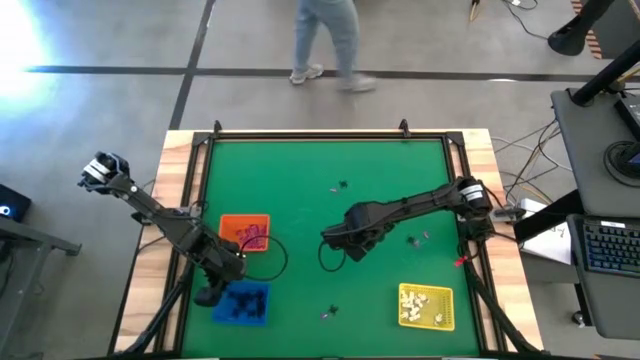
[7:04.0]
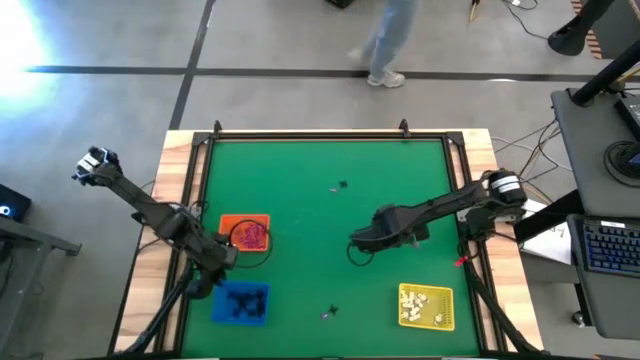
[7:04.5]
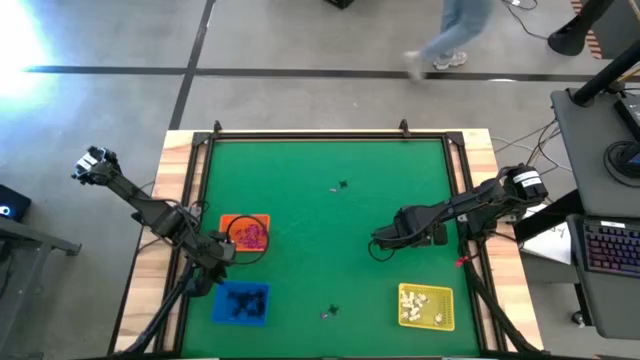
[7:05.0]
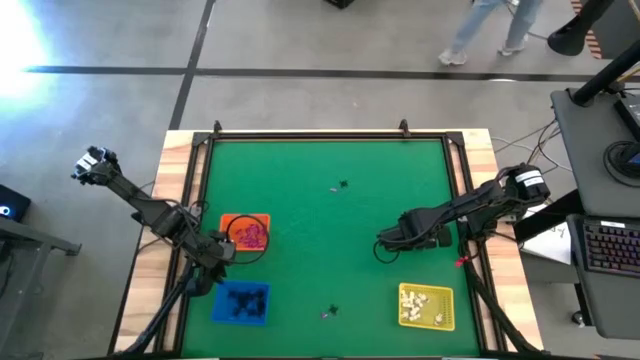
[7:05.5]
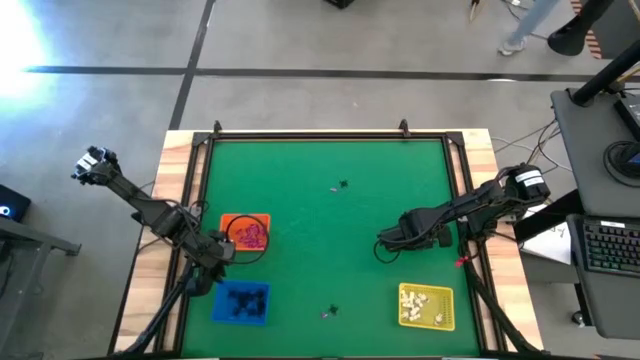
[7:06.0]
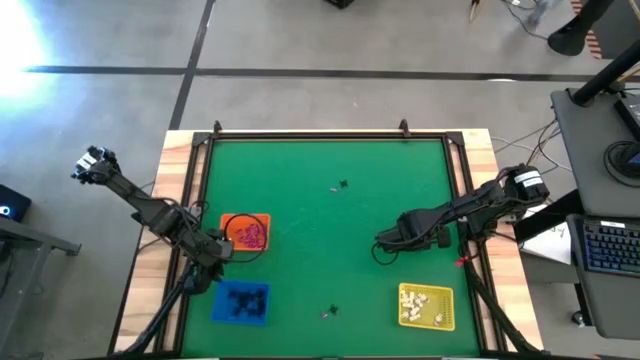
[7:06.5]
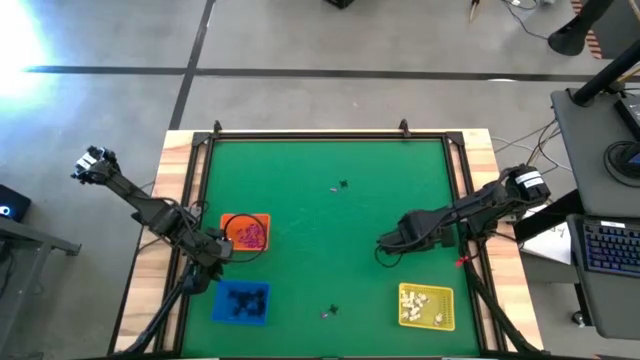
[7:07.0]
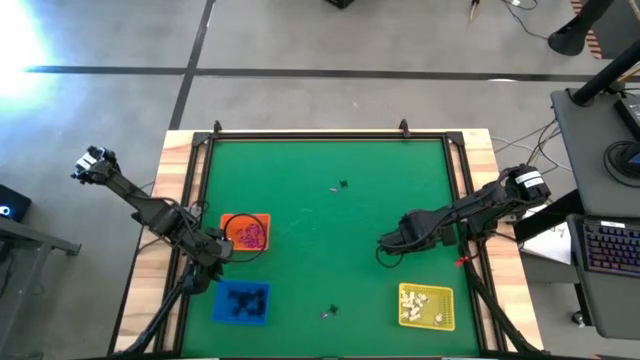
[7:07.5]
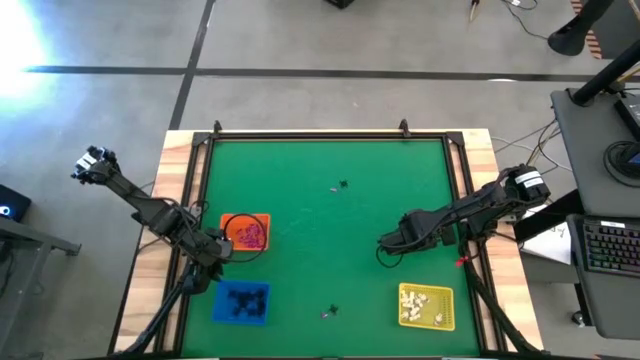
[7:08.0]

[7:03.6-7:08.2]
Task: Sort Halloween decoration
Put the violet witch hat toy into the orange bin

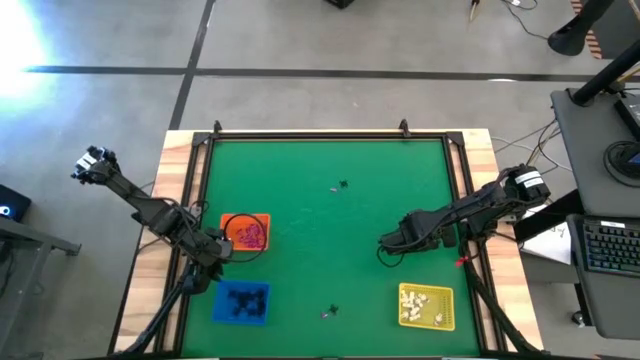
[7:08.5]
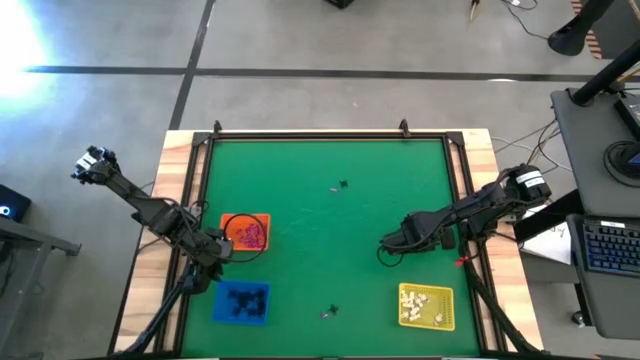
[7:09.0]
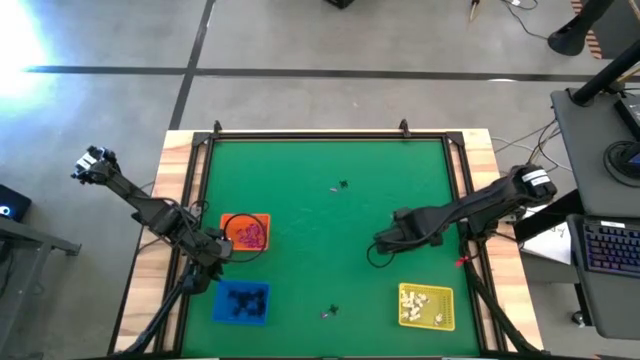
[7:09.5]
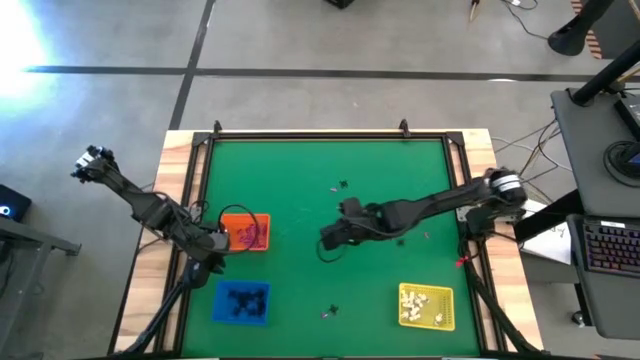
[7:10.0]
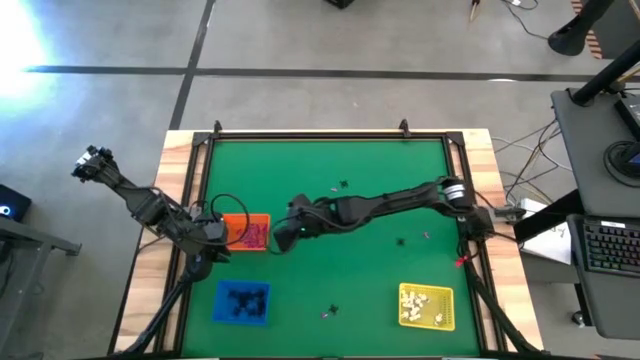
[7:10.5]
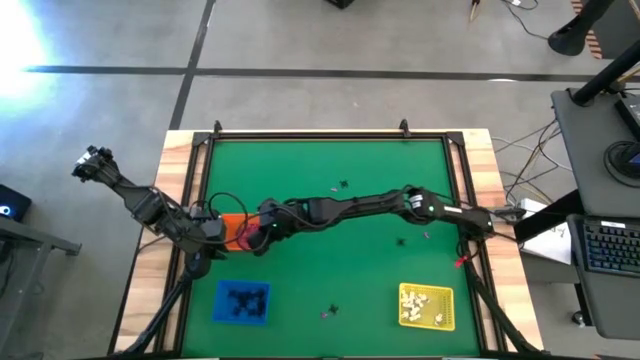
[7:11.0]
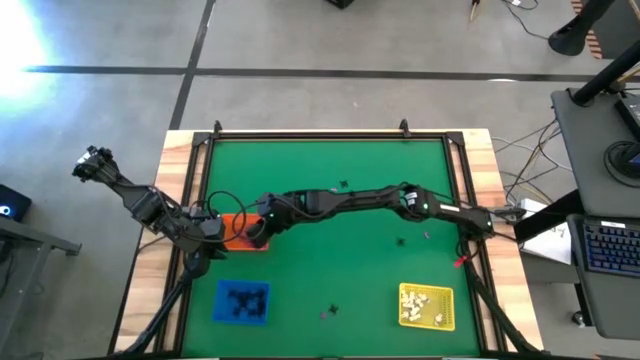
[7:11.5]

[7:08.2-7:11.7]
Put the violet witch hat toy into the orange bin

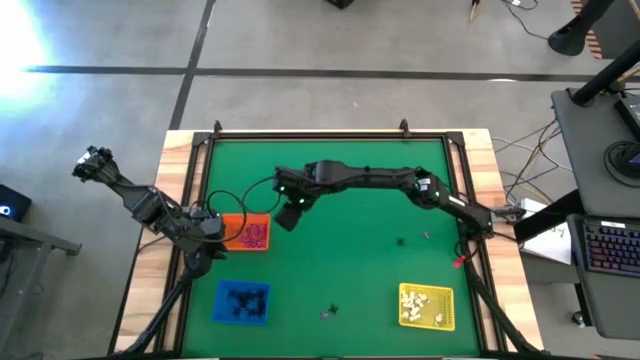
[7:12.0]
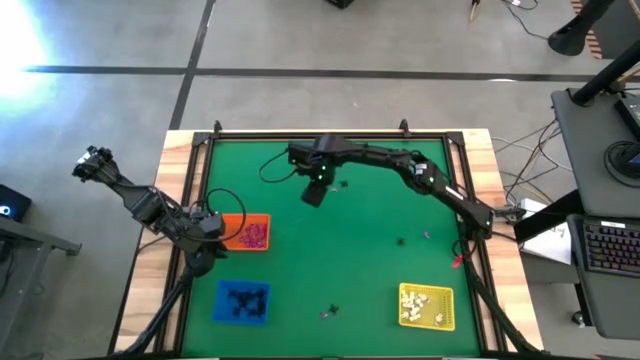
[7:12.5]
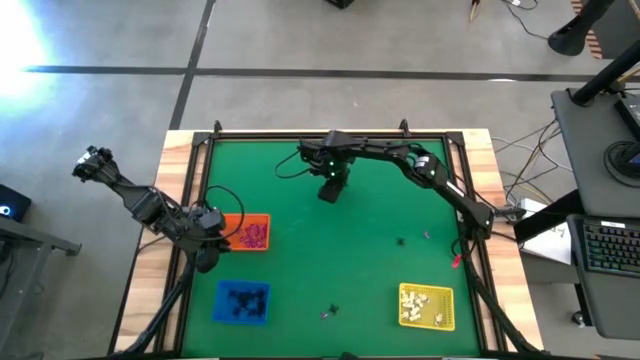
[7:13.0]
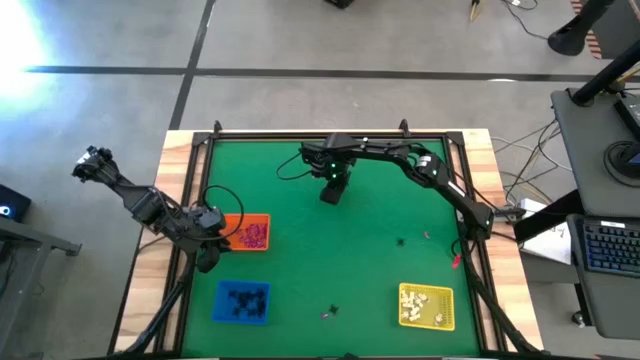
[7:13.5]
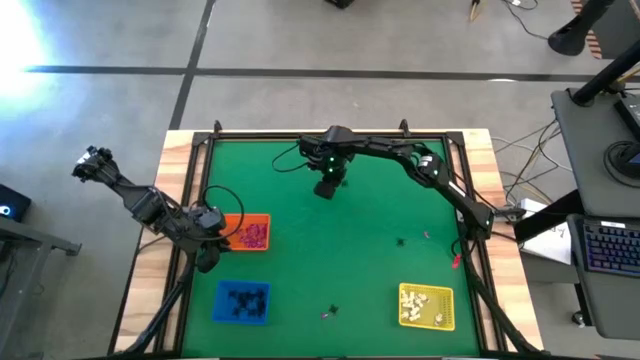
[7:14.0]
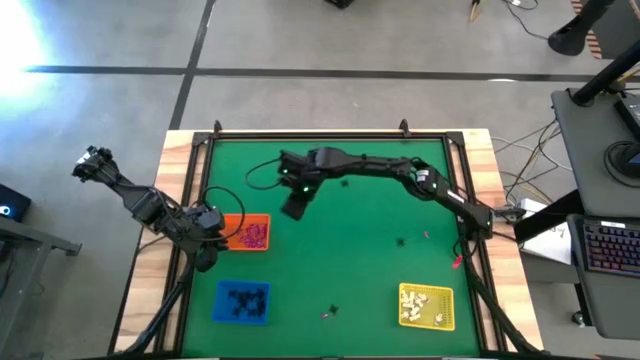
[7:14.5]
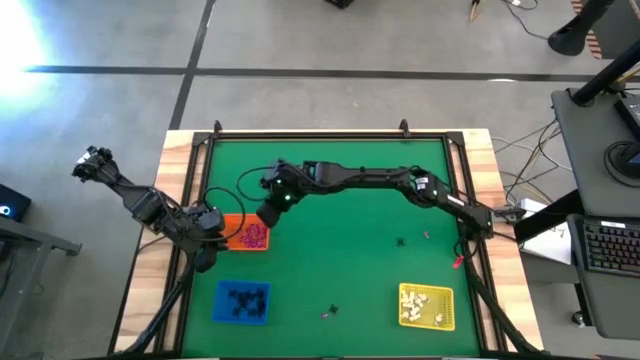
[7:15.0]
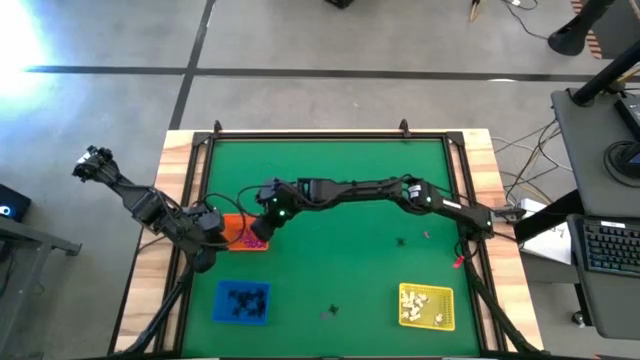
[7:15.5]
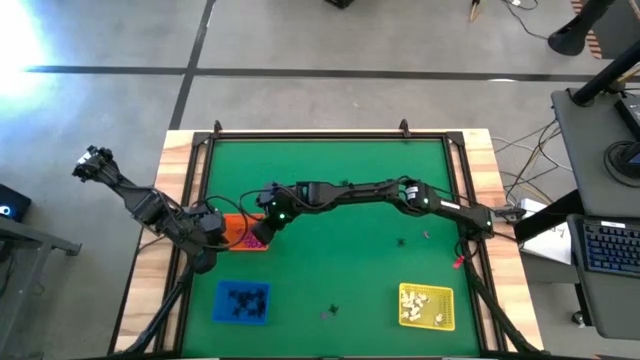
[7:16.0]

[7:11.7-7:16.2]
Put the violet witch hat toy into the orange bin

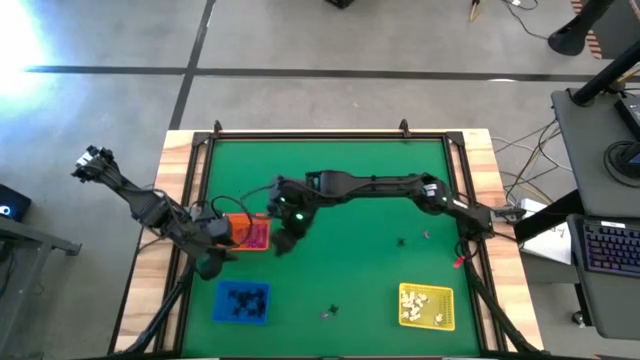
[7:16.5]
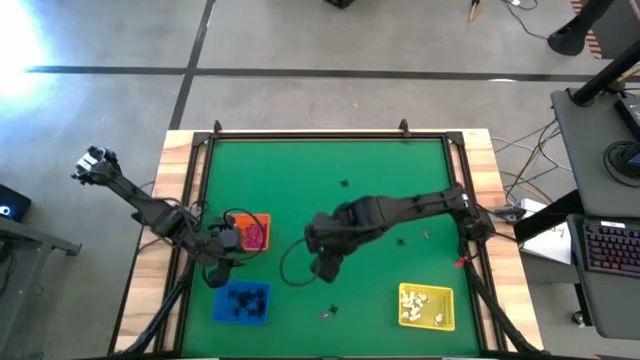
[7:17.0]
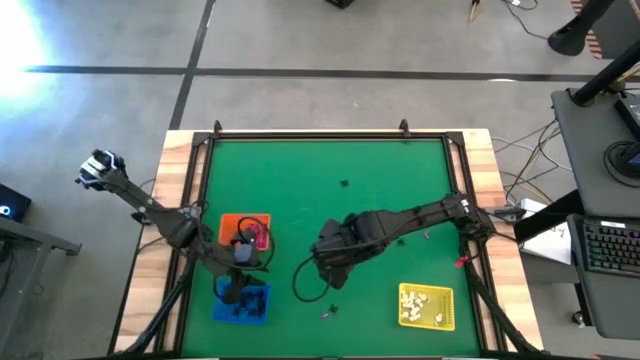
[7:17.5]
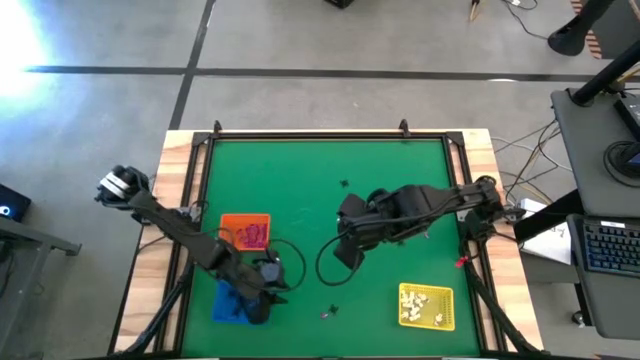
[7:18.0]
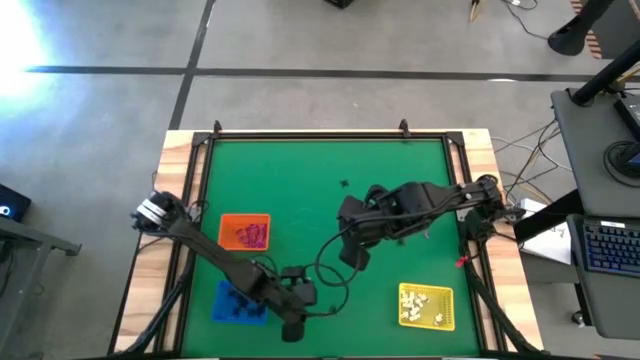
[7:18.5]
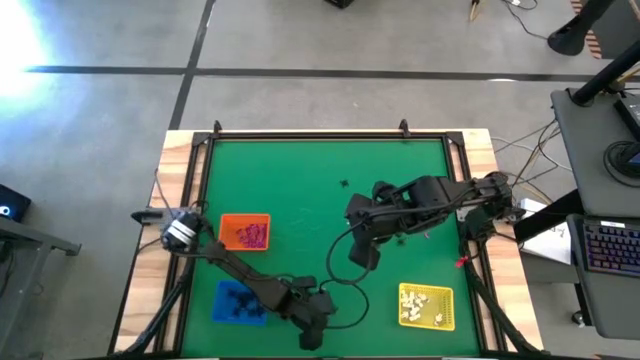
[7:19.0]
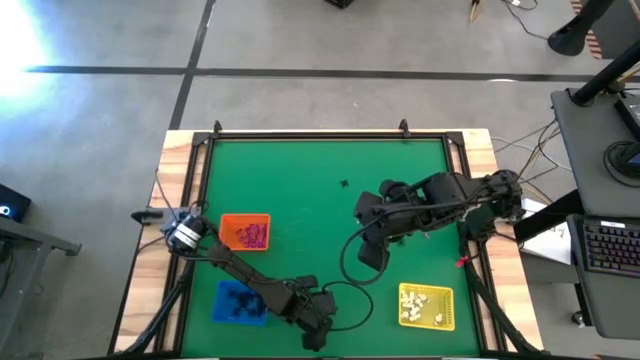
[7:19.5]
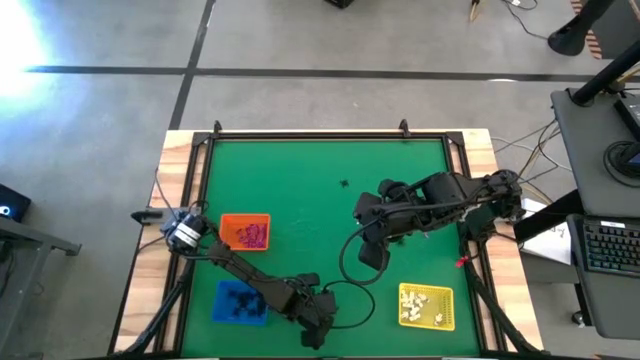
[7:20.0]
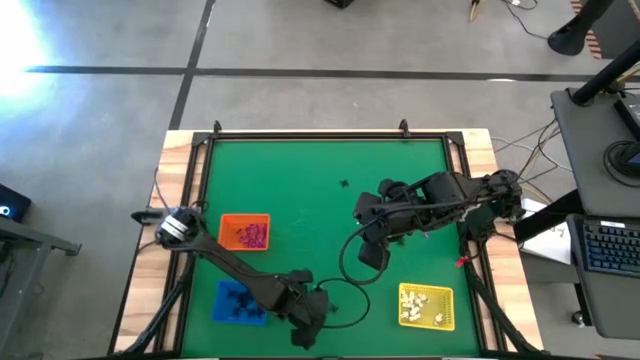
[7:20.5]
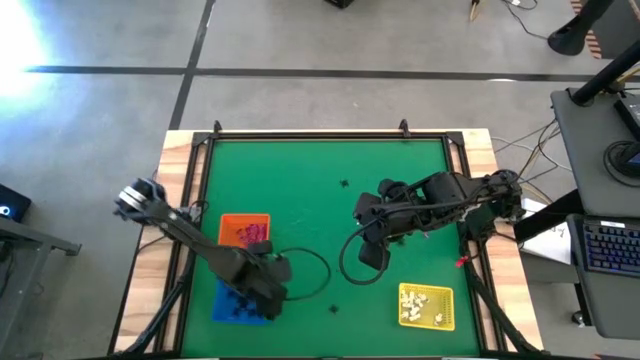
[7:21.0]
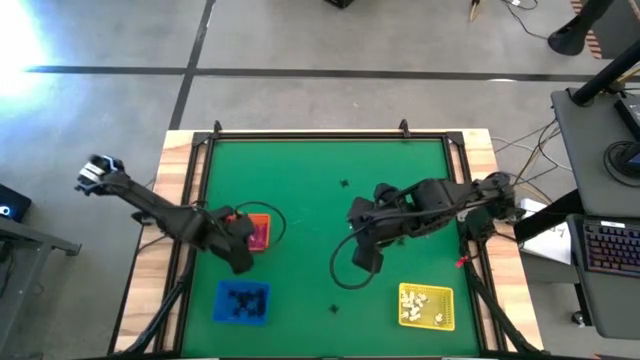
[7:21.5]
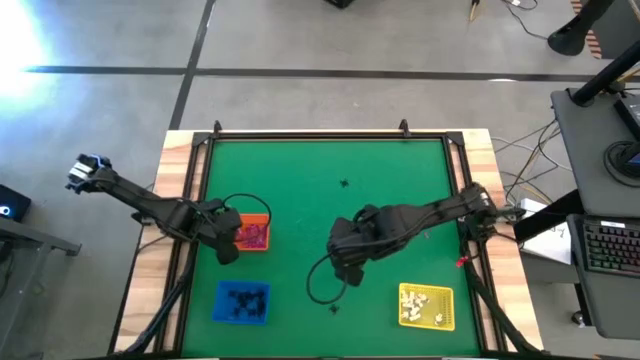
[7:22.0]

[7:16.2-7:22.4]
Put the violet witch hat toy into the orange bin

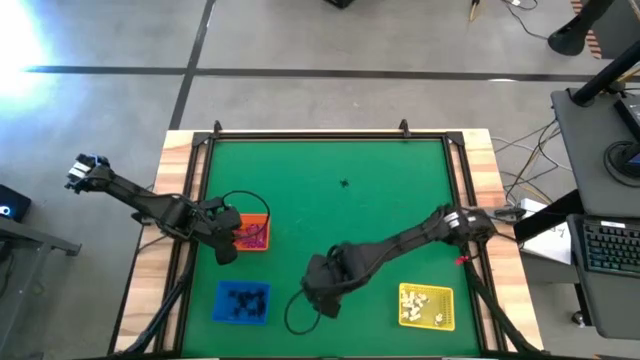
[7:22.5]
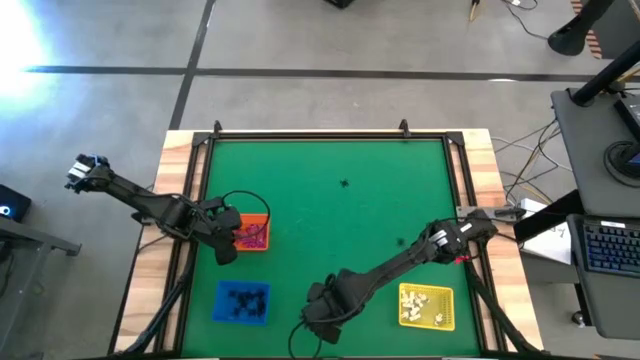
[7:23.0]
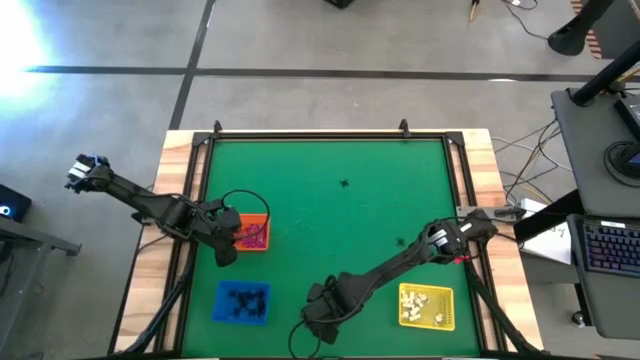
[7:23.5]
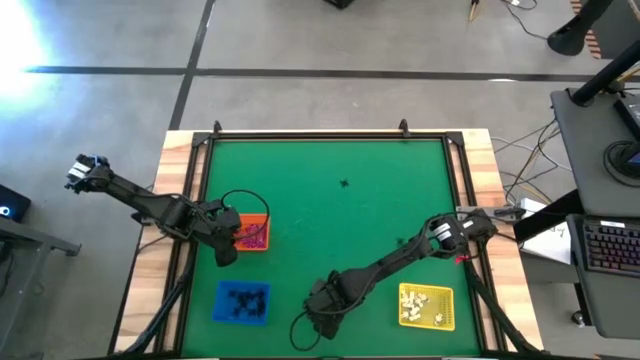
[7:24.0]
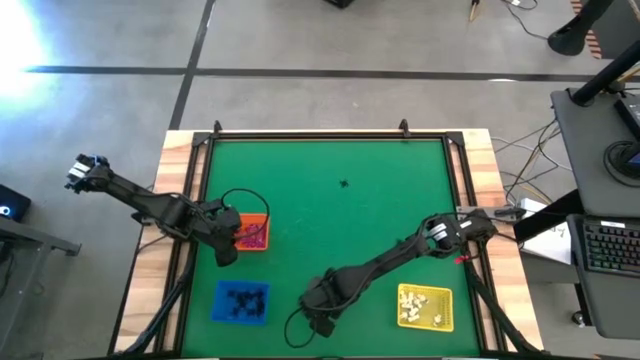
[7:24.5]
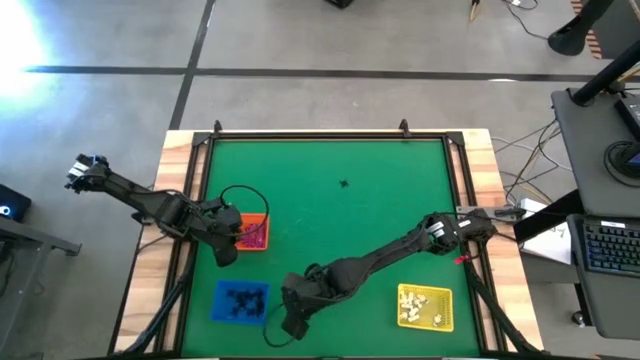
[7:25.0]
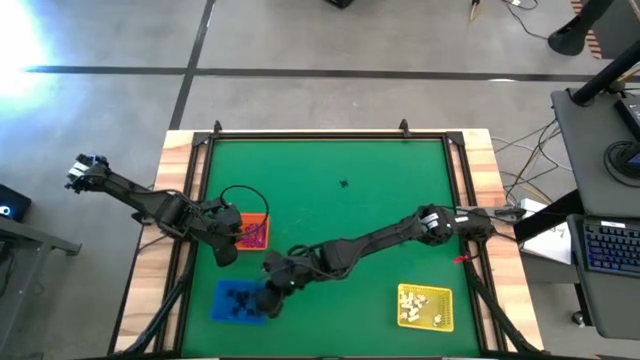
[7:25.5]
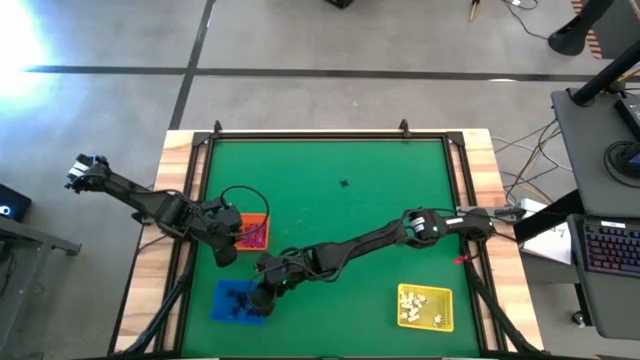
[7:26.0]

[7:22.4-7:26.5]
Put the black spider toy into the blue bin
